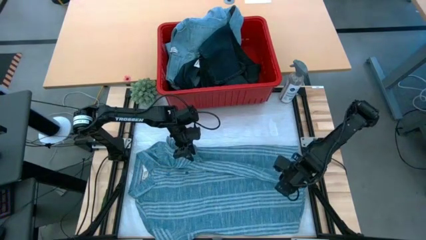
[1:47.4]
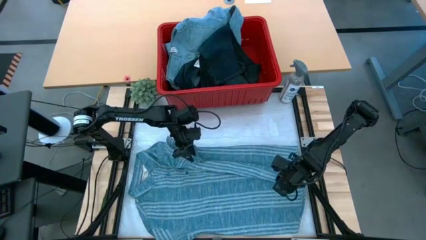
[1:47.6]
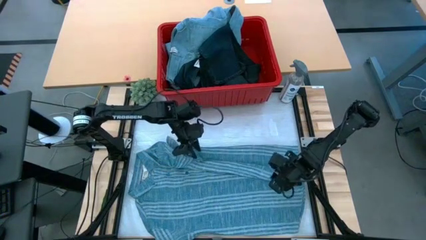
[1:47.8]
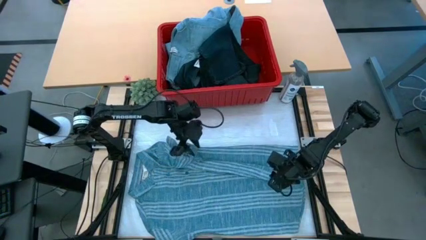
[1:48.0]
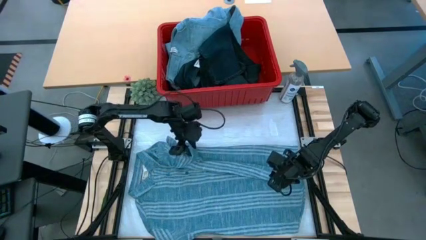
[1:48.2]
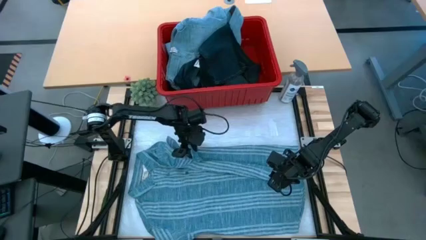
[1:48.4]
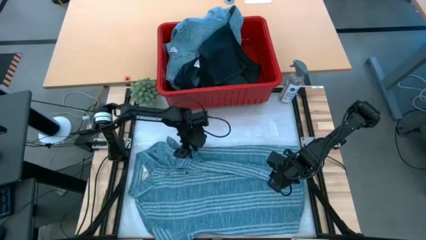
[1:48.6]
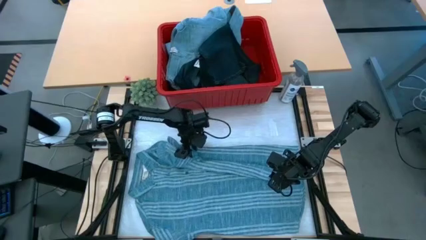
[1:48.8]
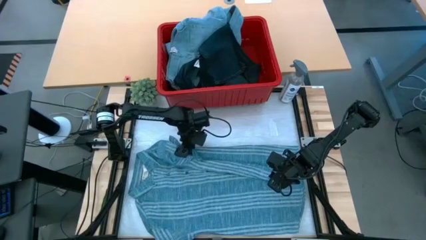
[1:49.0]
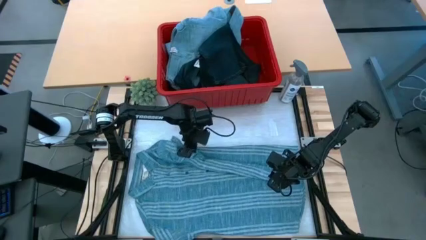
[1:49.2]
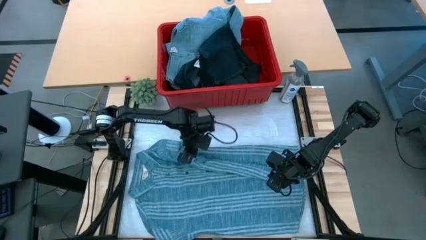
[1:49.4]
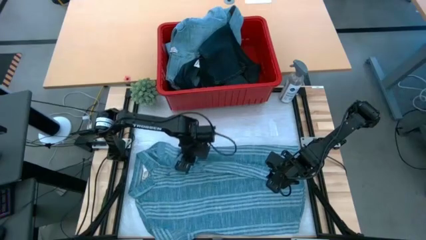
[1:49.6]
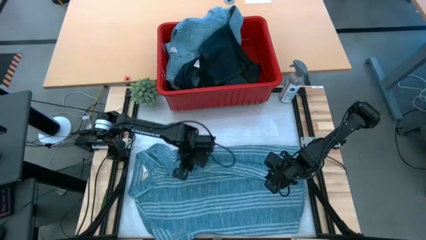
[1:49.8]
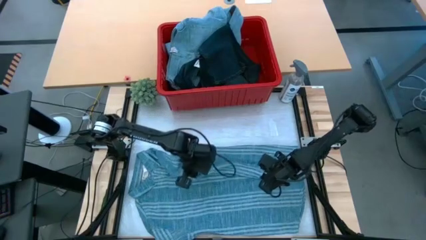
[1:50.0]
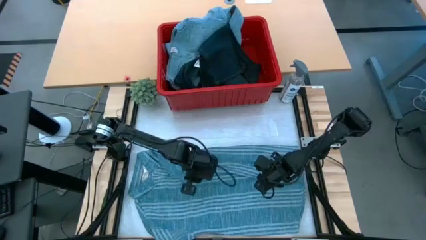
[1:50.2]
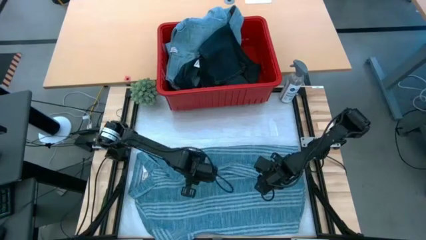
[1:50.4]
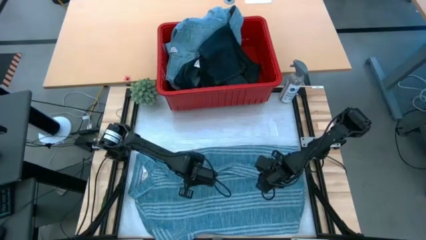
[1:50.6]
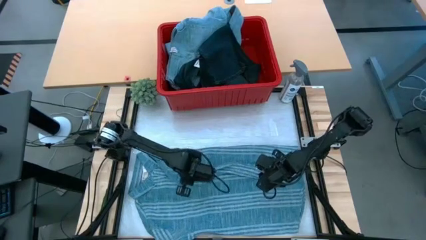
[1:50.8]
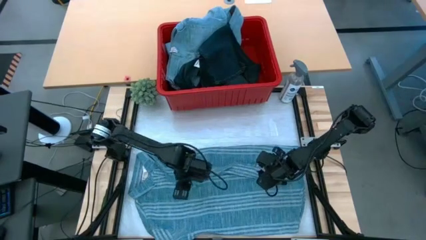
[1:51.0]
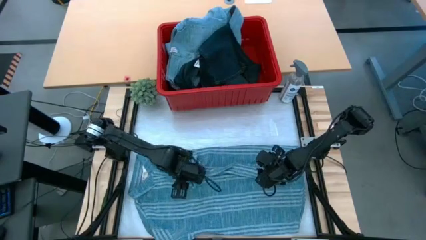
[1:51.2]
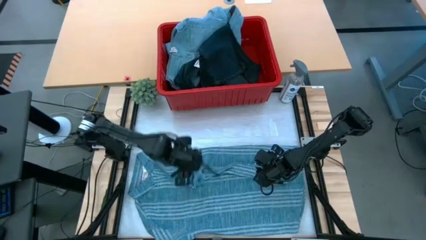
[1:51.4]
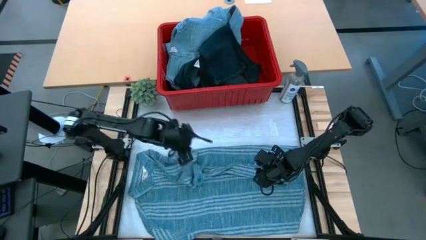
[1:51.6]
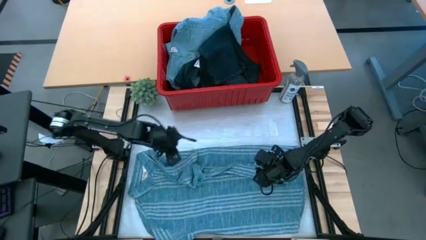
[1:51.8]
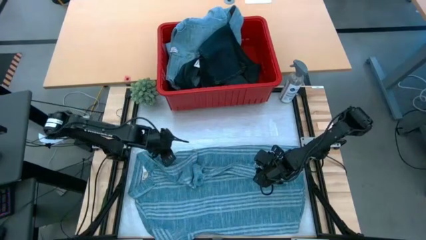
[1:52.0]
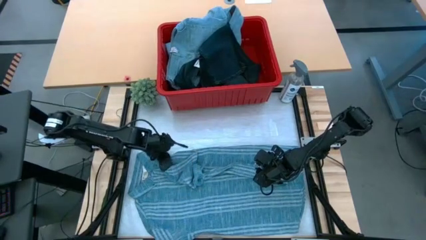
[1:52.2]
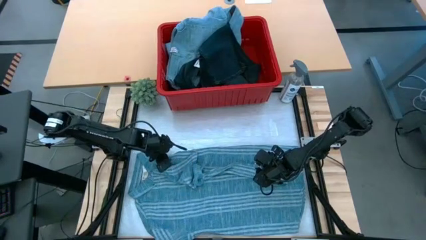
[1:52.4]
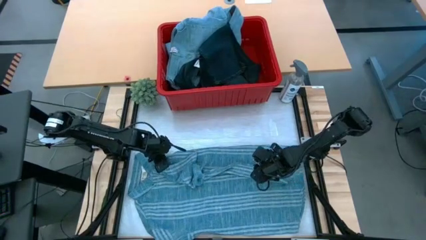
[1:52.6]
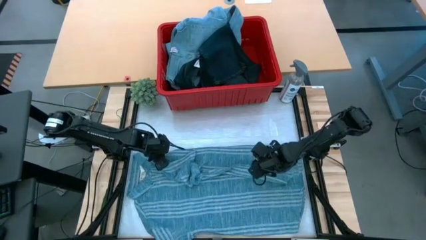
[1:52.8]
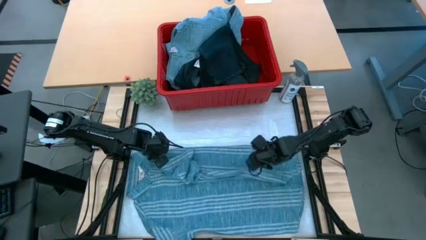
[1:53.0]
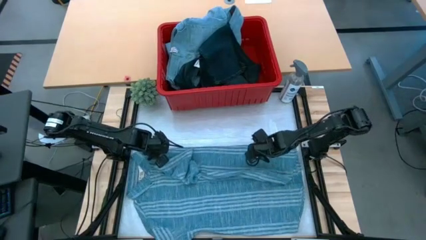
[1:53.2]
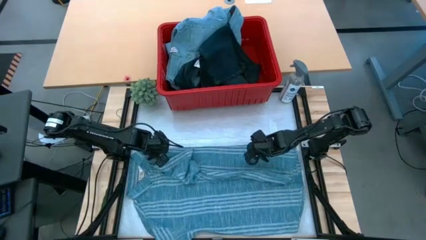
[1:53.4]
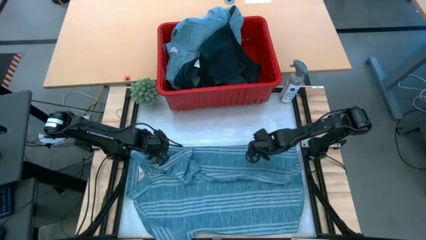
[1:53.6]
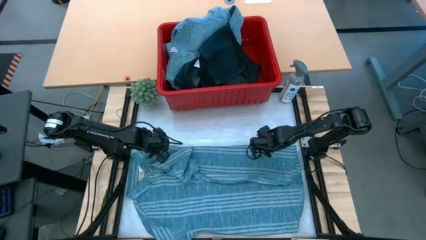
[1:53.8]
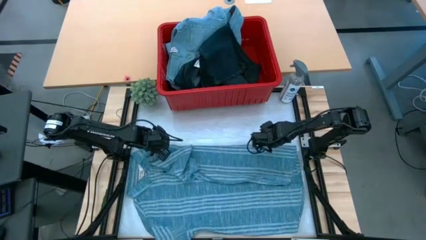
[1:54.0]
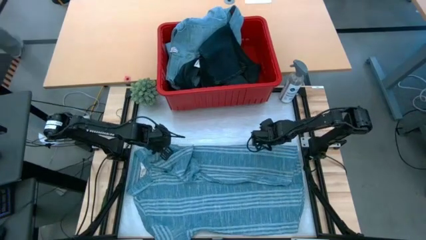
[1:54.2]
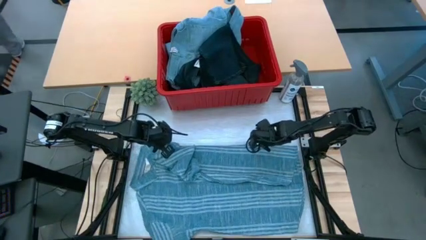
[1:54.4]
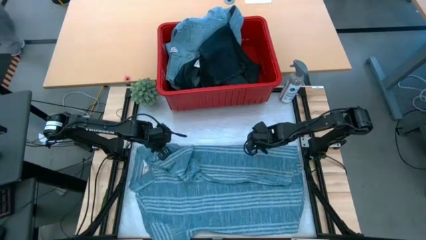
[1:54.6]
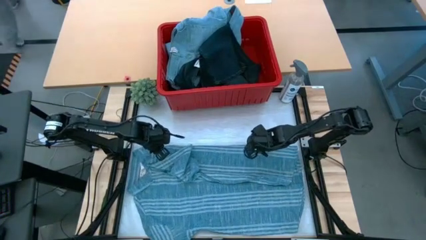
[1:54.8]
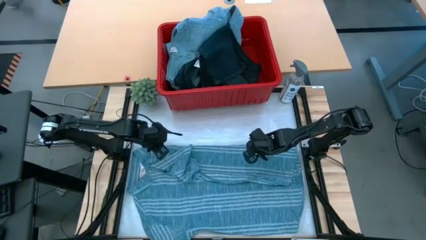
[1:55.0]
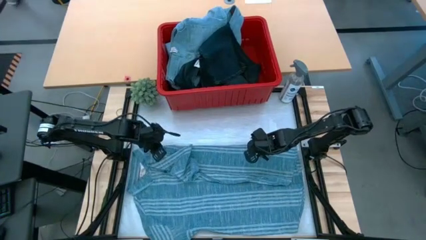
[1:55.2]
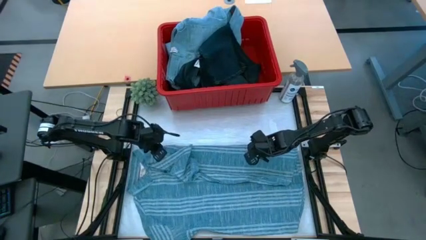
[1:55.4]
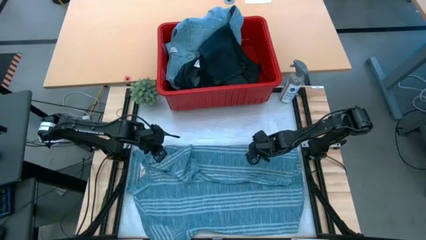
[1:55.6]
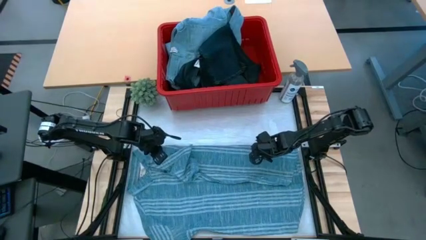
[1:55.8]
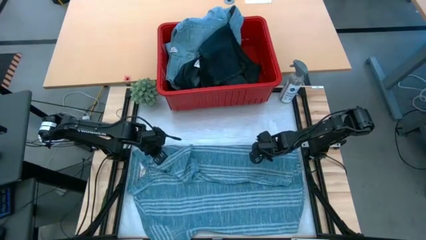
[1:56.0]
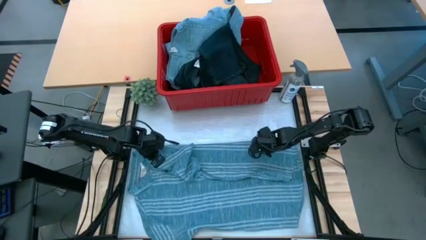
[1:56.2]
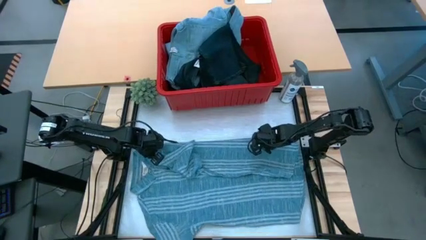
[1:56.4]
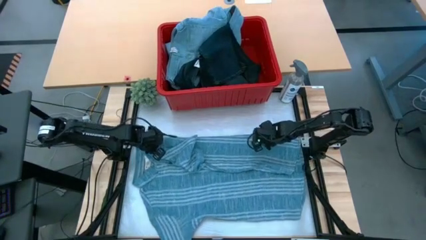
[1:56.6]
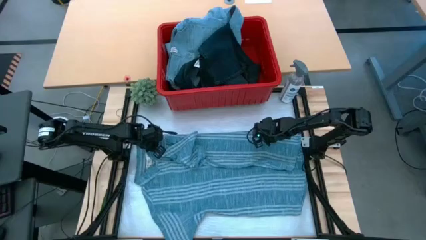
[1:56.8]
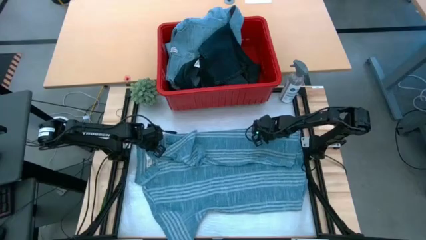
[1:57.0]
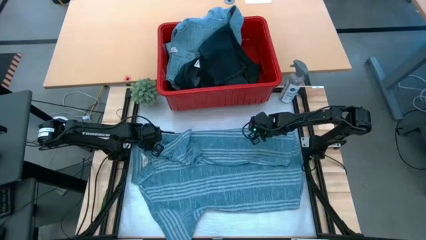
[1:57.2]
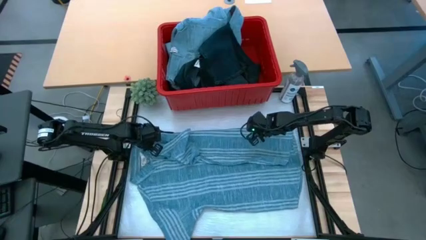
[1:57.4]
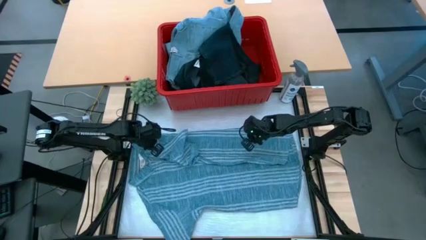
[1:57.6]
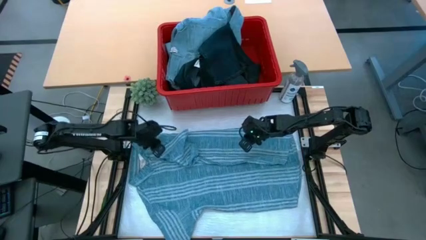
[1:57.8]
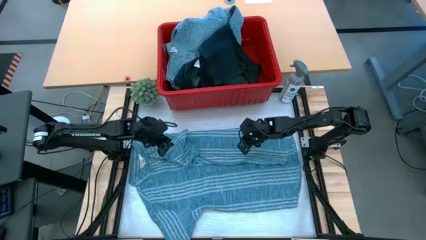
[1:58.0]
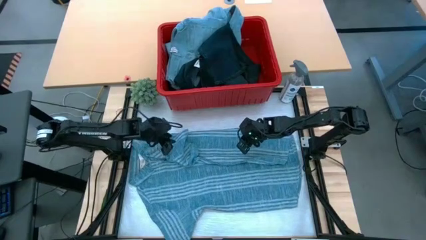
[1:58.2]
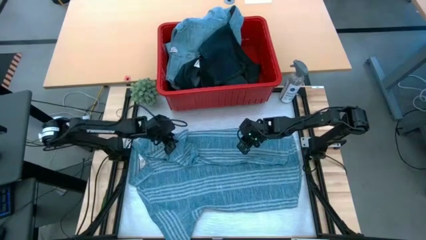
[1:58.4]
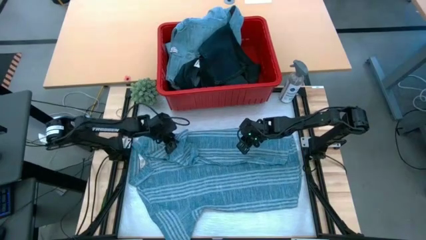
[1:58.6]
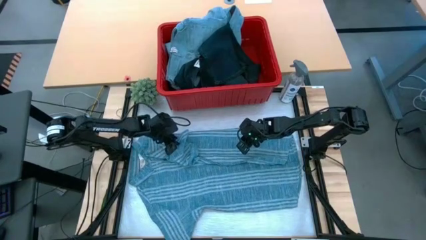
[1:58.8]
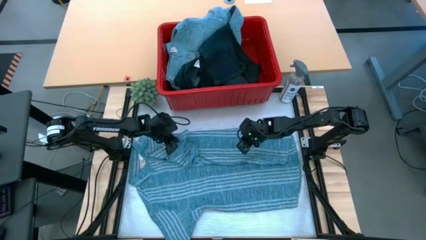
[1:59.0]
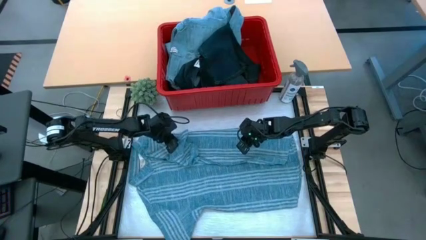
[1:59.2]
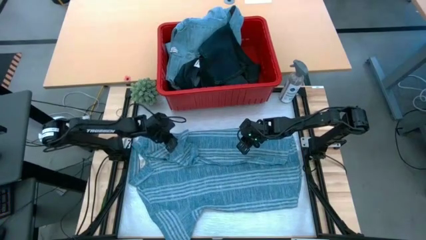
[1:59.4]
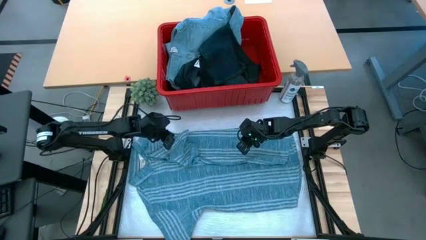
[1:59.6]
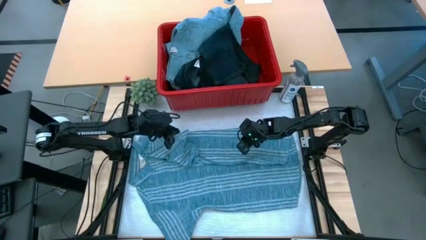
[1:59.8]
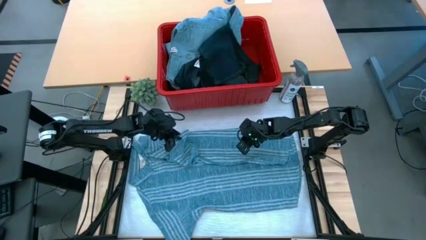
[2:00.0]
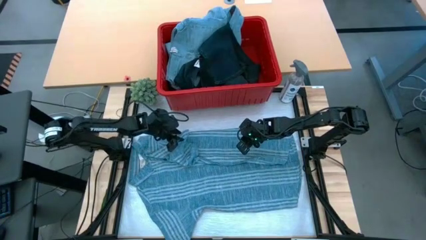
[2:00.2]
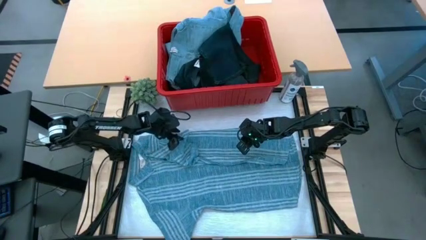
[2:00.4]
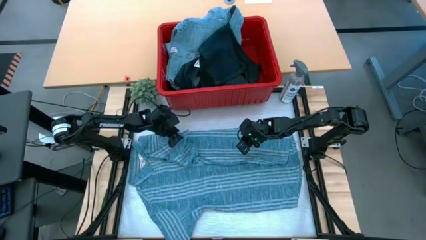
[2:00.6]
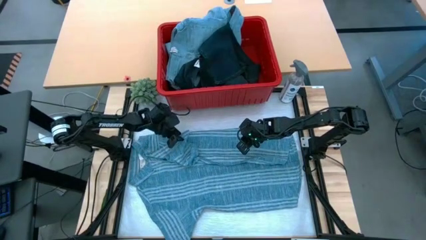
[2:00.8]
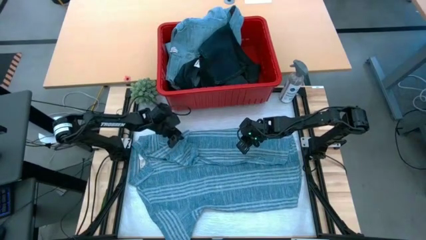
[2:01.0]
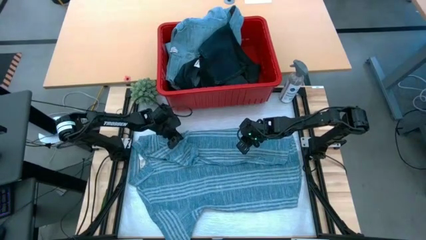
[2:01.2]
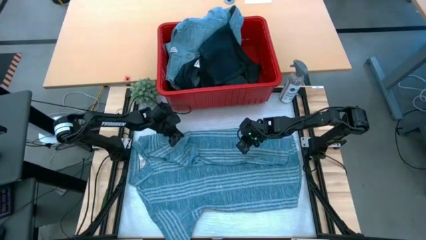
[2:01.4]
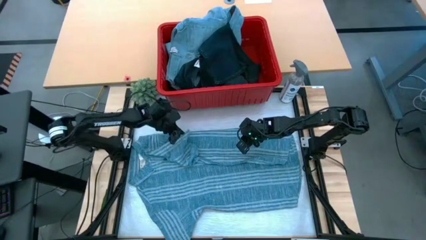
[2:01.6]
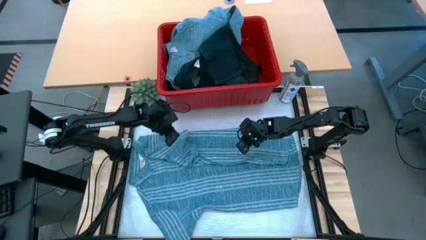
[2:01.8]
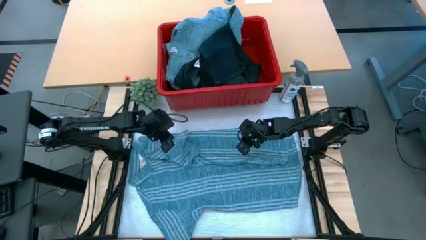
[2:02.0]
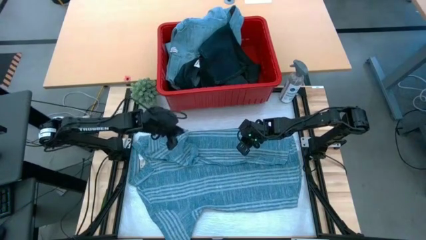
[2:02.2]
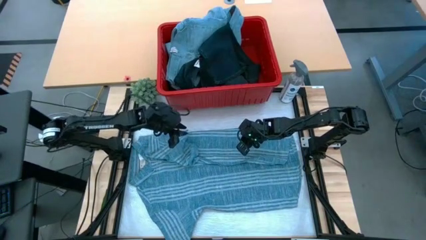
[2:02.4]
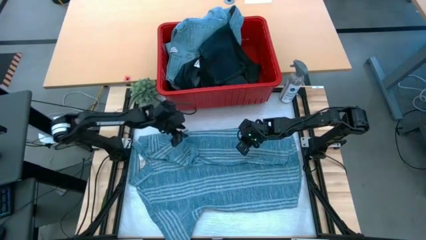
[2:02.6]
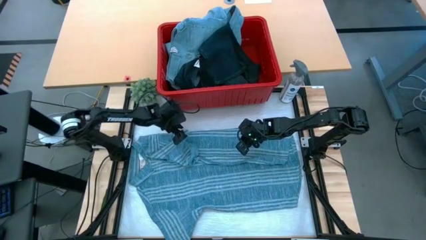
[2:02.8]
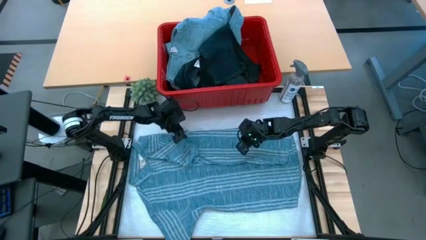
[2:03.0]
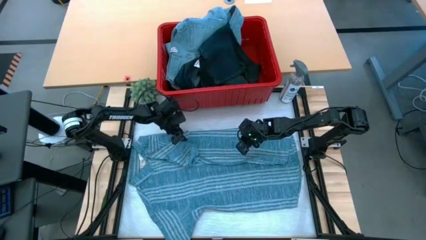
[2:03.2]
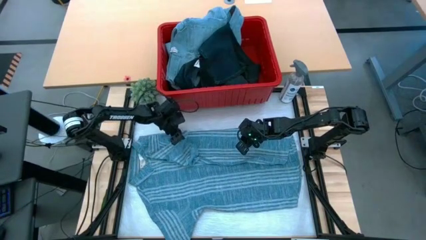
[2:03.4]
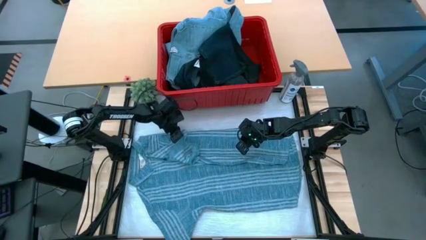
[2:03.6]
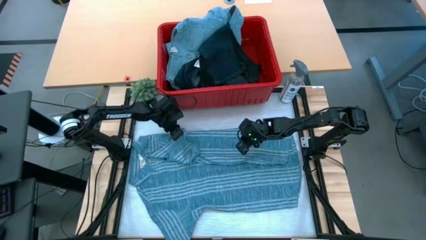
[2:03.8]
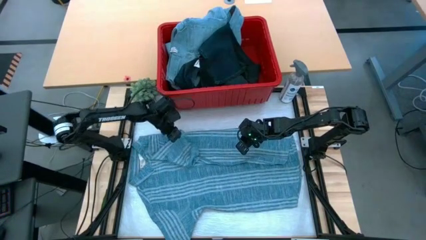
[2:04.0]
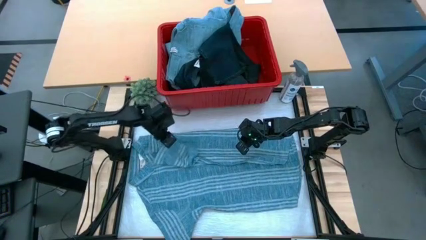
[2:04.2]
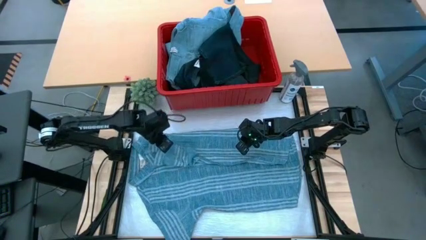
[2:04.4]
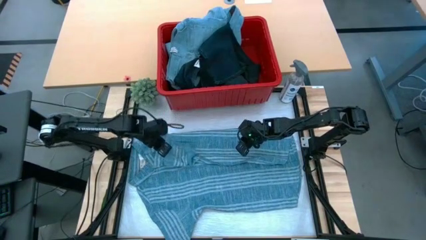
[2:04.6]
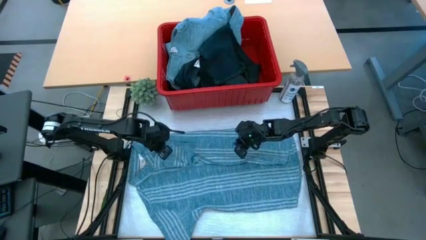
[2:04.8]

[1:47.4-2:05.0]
Task: Fold Laundry from Bin
Fold the blue polo shirt
